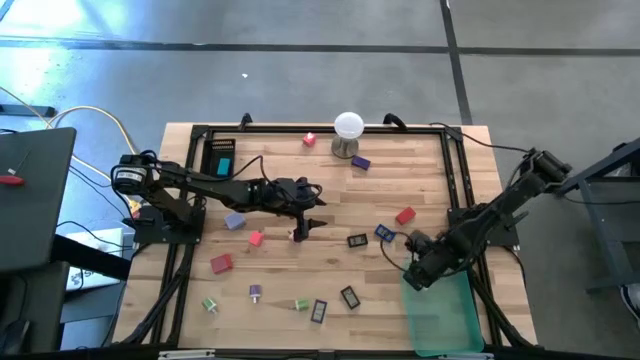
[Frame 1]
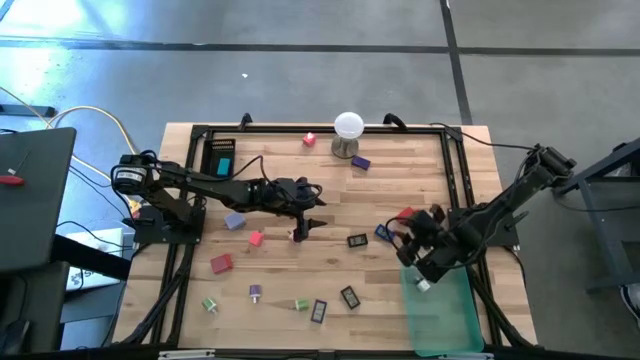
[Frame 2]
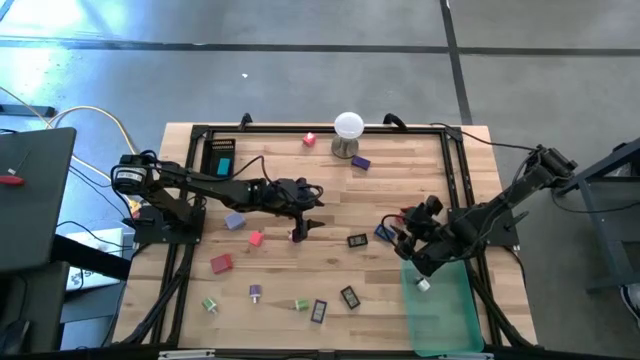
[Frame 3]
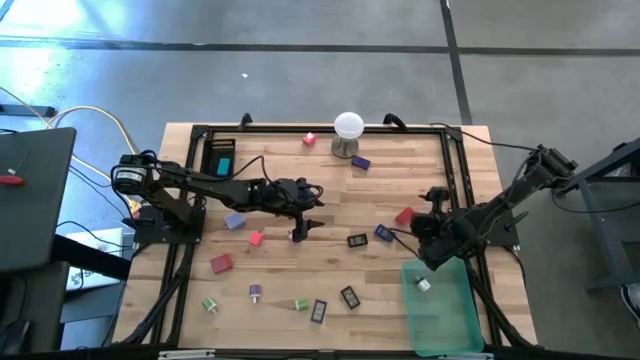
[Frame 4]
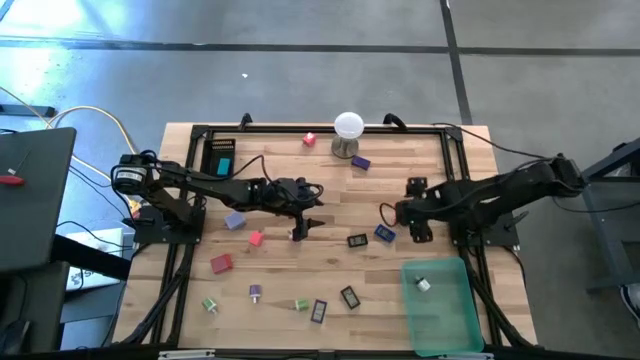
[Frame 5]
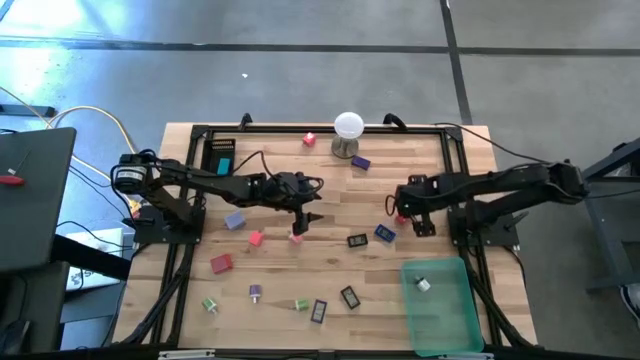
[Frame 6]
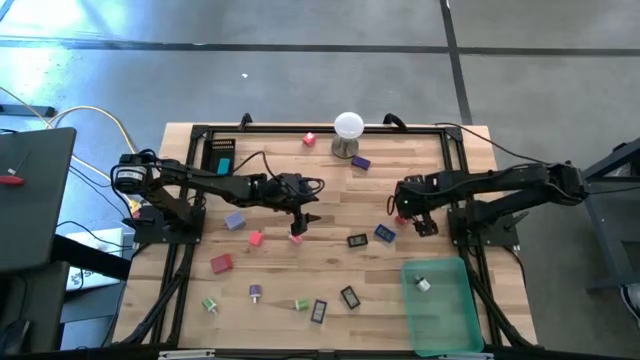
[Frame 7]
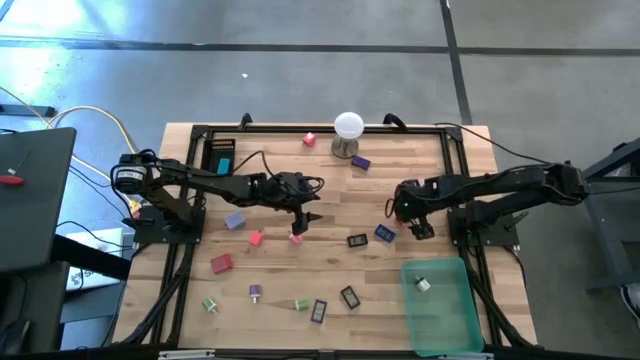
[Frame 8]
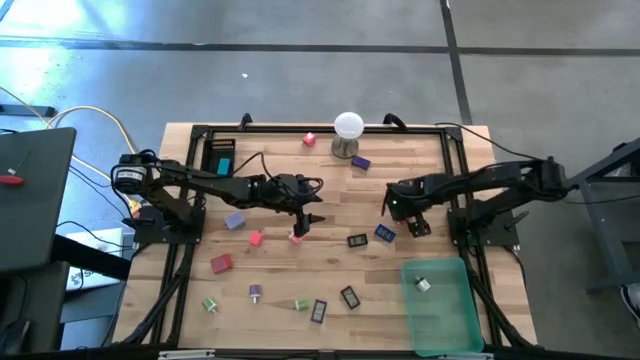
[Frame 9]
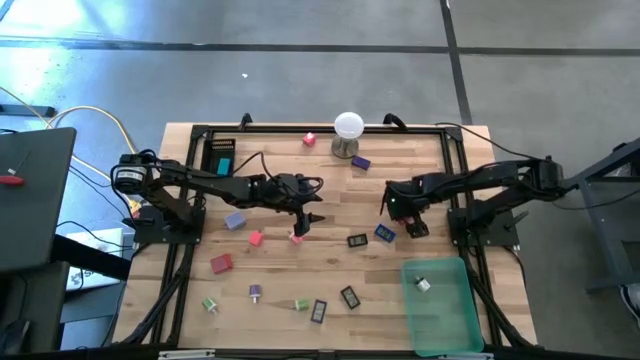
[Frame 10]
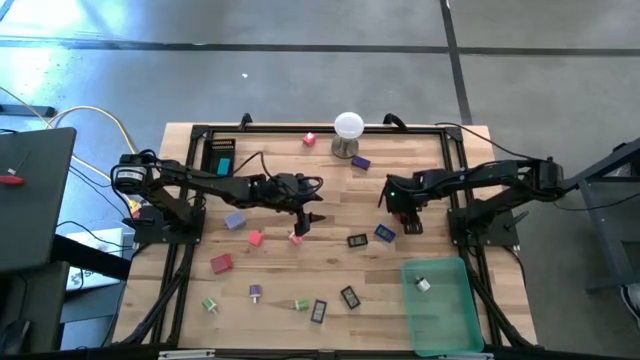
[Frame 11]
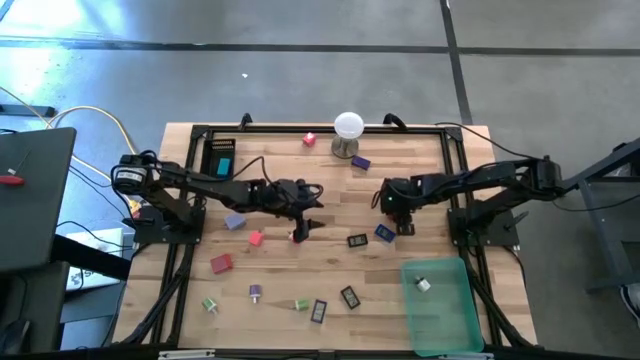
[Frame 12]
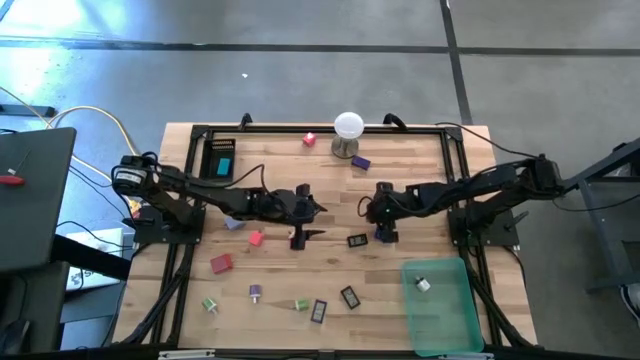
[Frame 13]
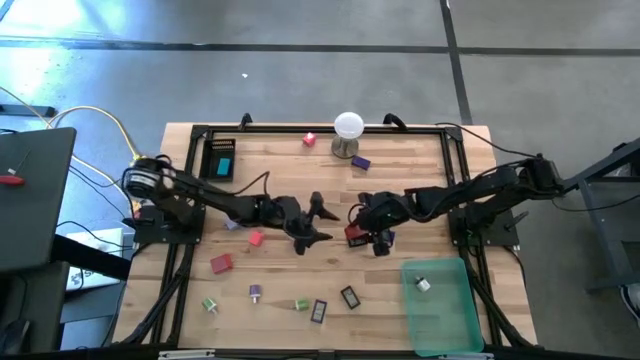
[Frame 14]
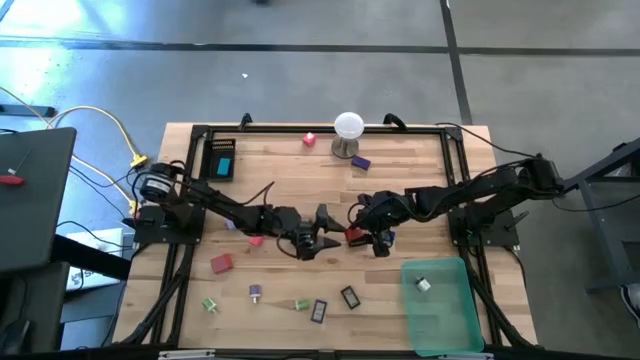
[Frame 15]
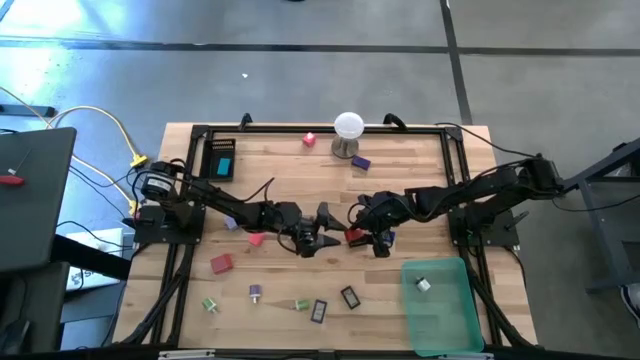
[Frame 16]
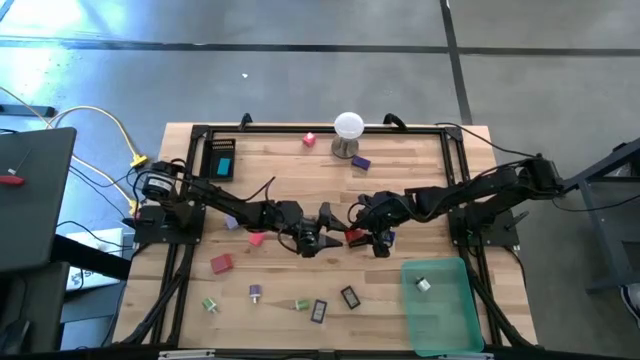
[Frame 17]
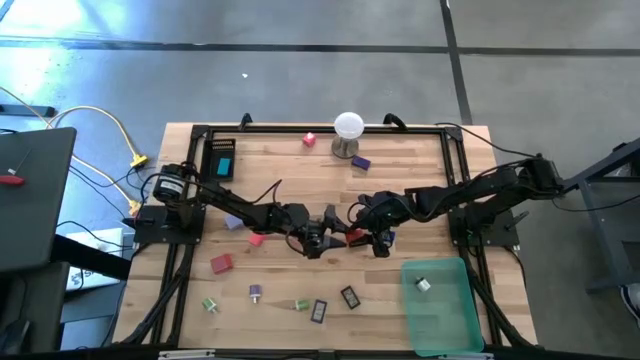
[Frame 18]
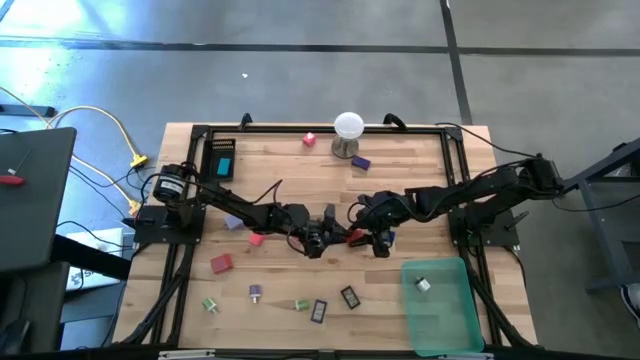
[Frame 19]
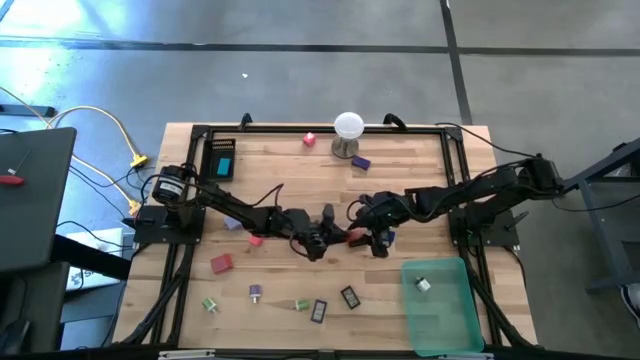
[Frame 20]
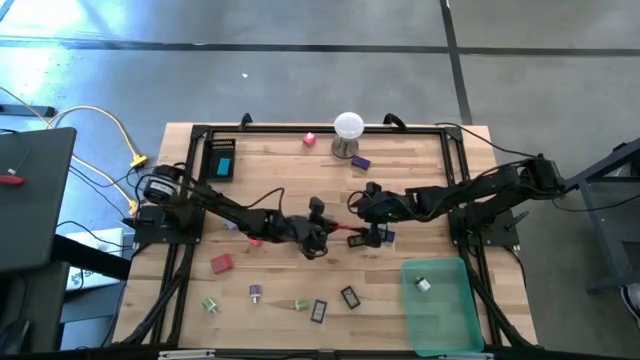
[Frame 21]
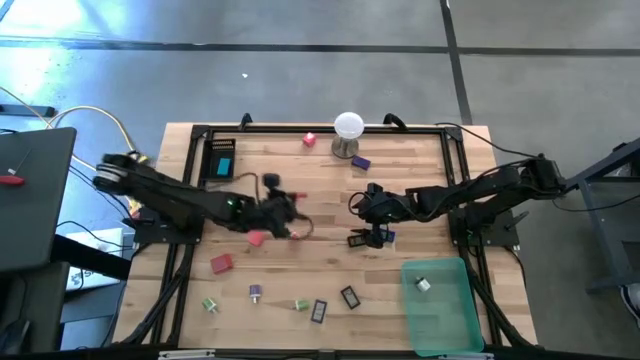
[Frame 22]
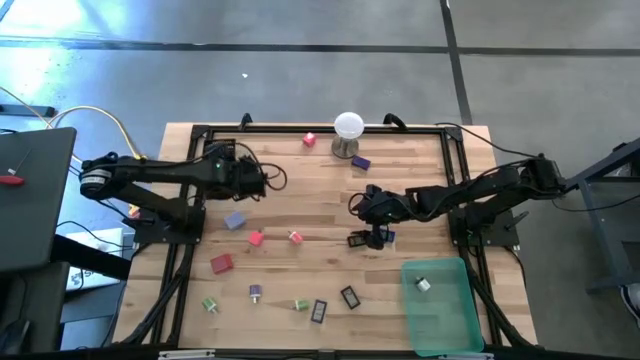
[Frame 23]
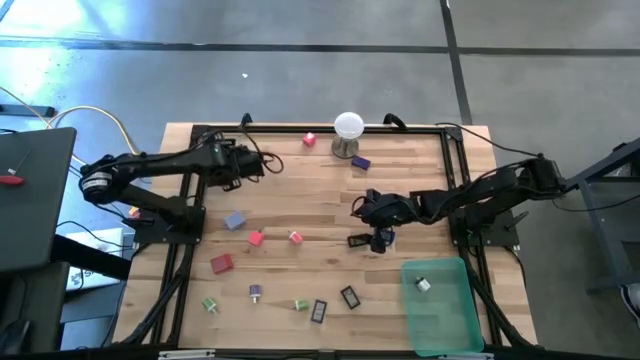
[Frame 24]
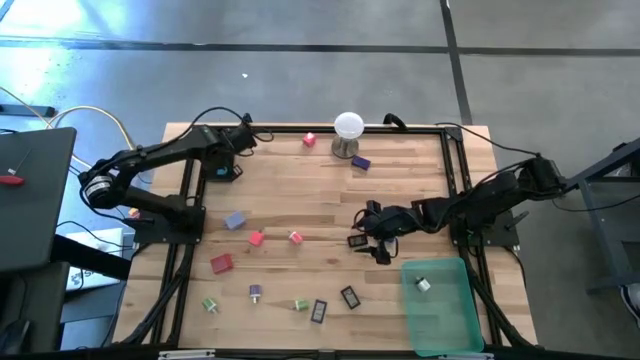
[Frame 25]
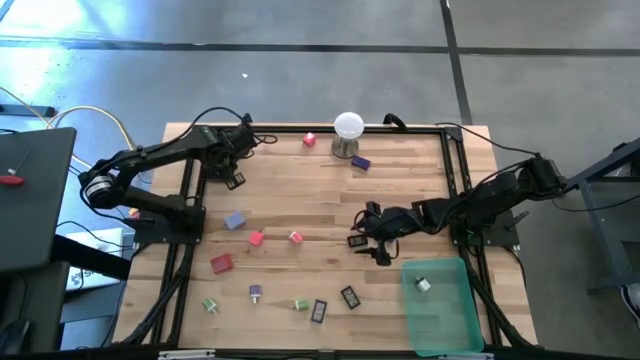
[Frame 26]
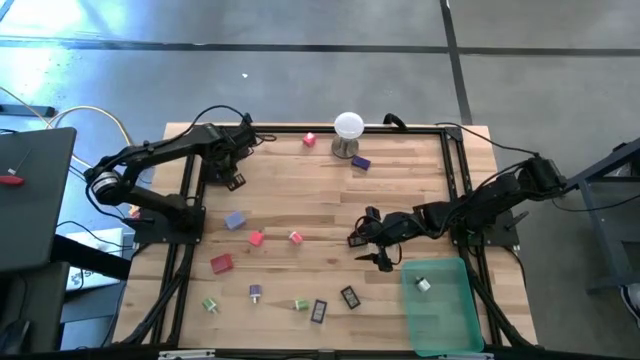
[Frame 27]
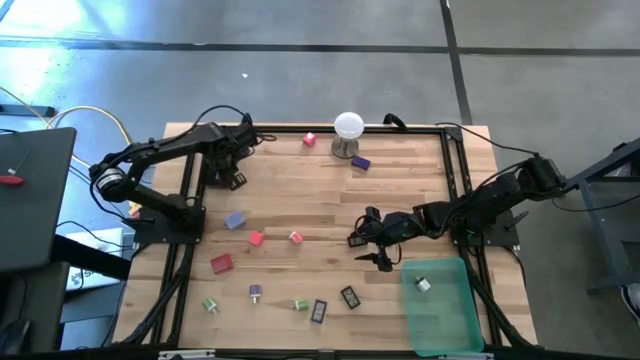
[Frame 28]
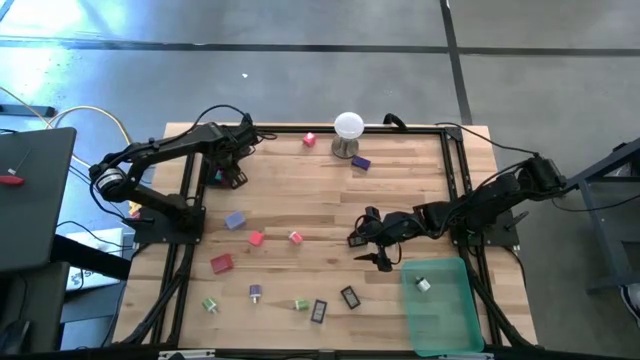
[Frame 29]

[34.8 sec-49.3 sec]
Task: Pick & Place Office items
Put the red digital clock into the black bin

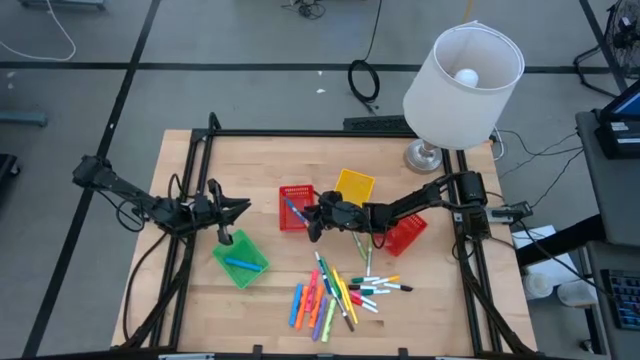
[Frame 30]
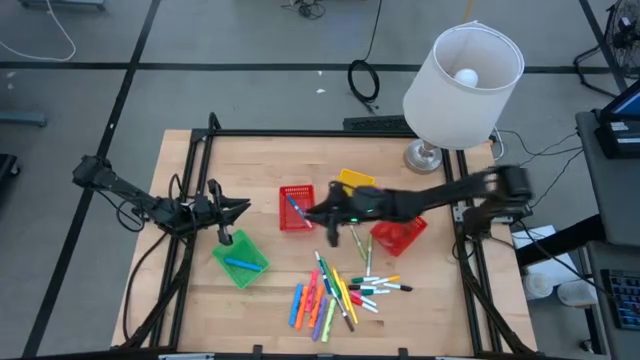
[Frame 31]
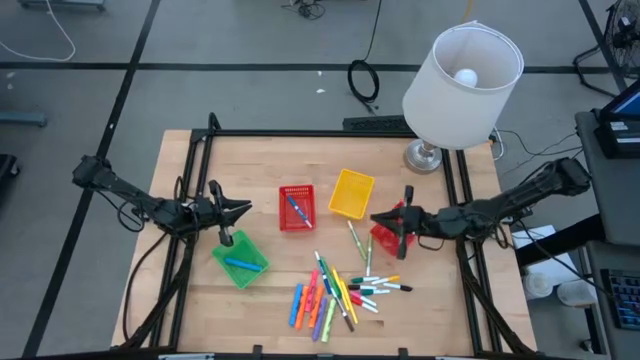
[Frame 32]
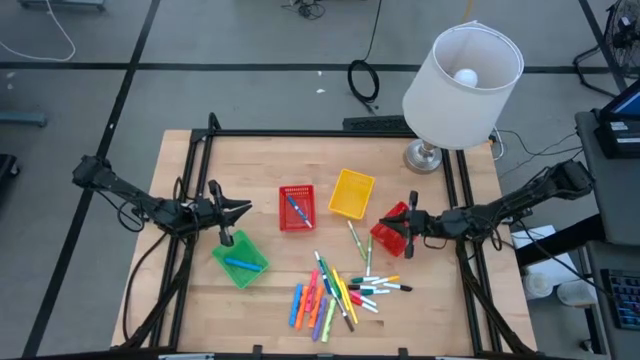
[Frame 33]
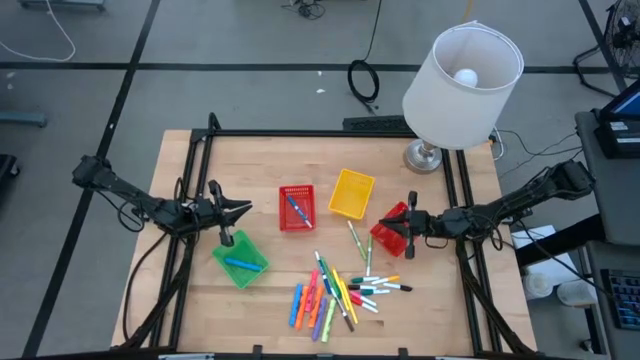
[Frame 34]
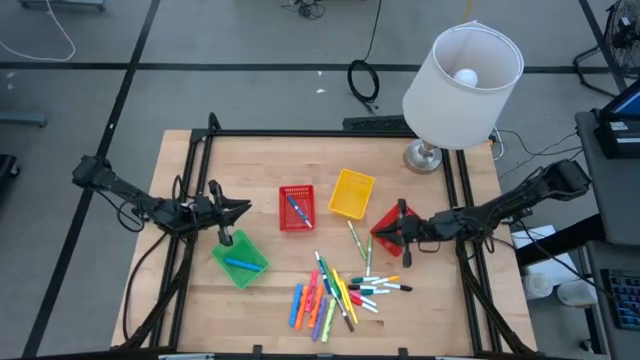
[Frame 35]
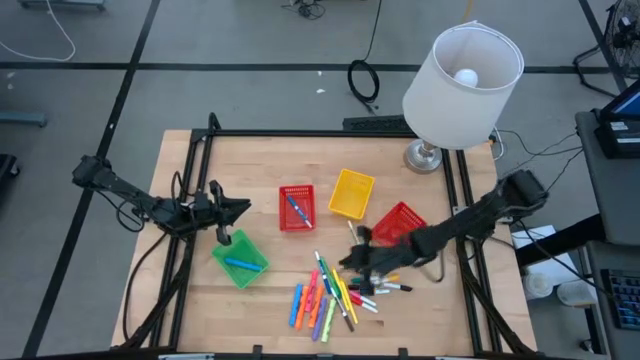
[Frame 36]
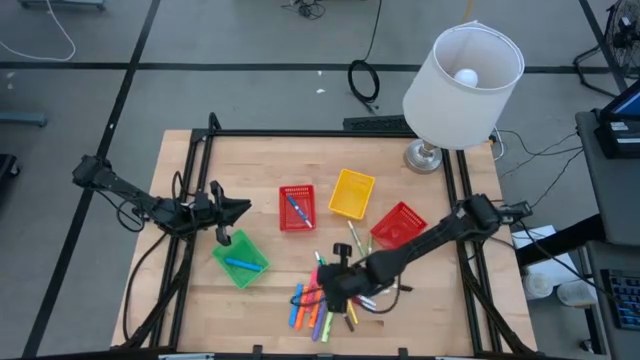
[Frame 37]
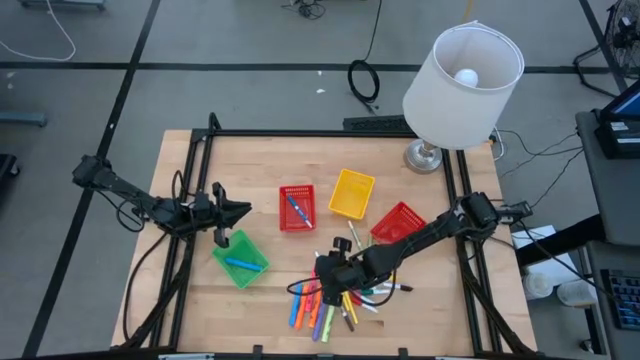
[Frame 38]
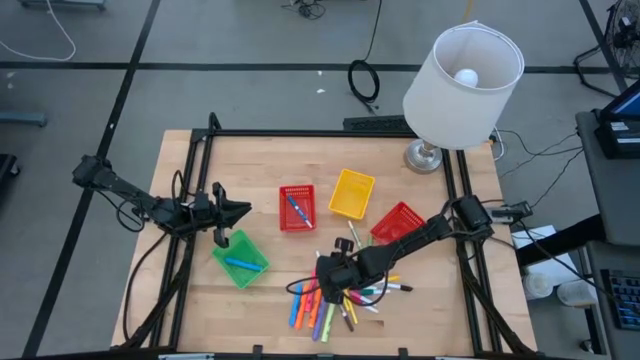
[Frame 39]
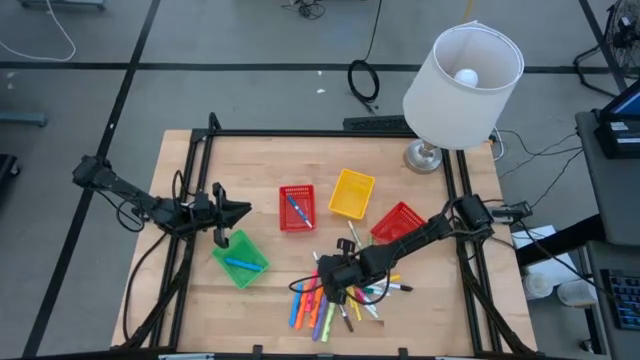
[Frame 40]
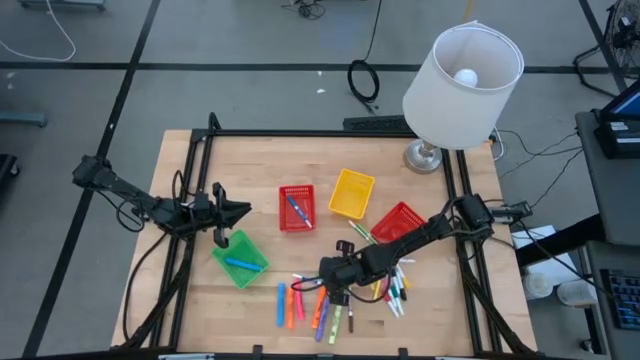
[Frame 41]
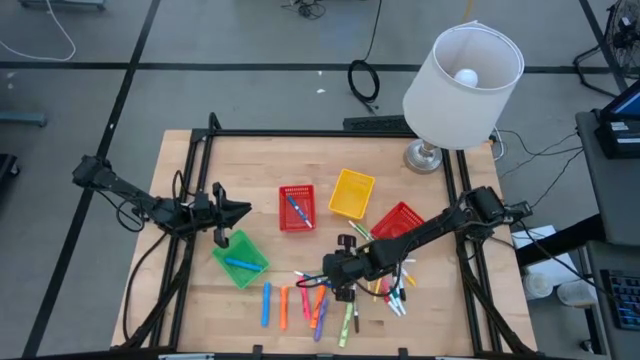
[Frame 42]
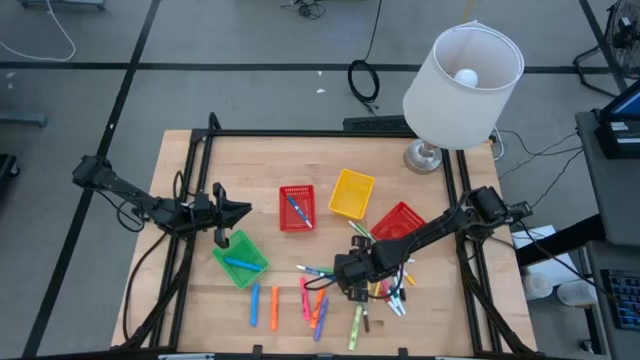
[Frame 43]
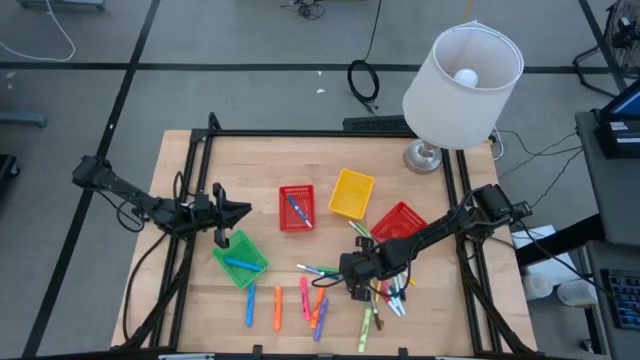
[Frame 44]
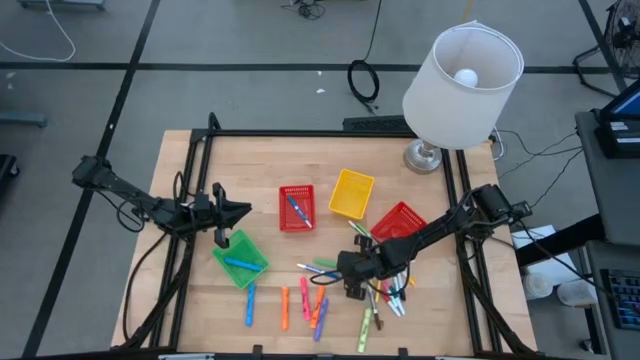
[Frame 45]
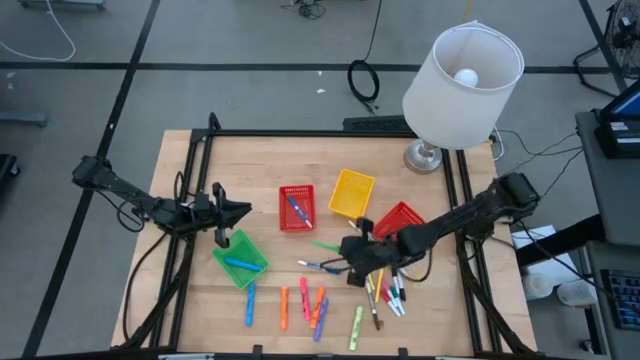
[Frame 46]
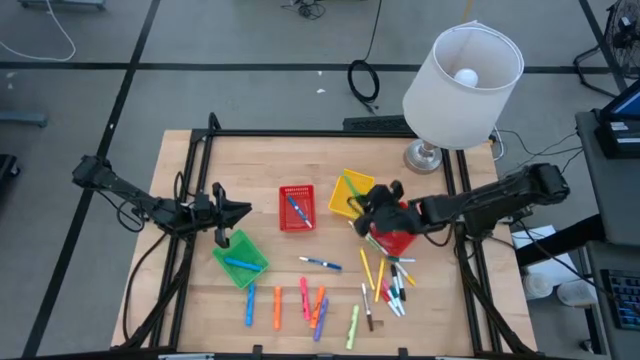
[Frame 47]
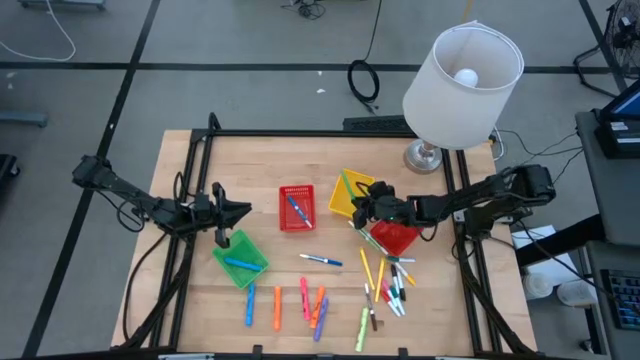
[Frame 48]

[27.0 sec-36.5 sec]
Task: Pick & Place Markers
Put the green pen into the yellow bin
